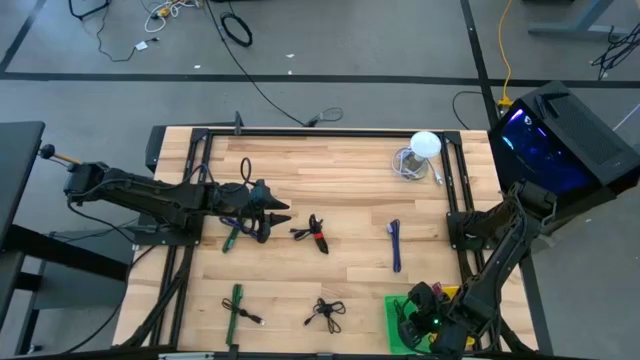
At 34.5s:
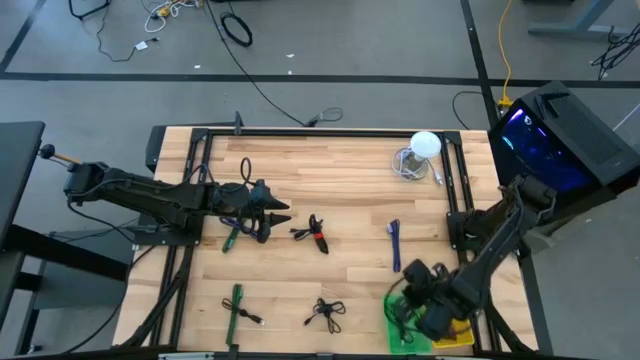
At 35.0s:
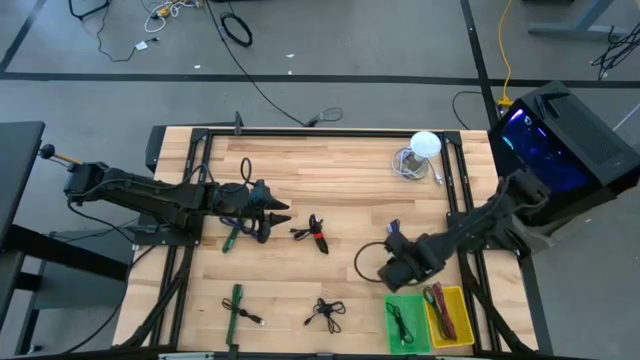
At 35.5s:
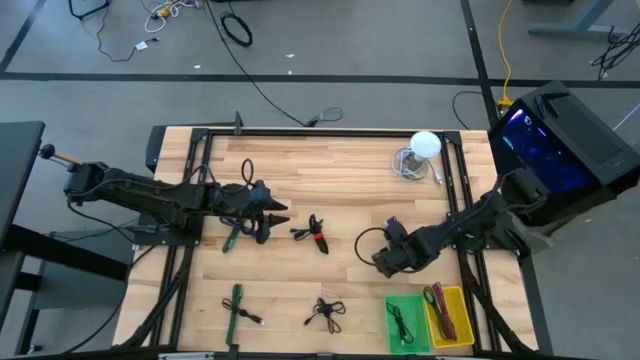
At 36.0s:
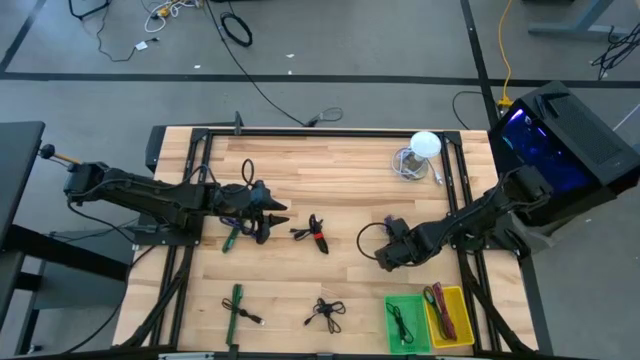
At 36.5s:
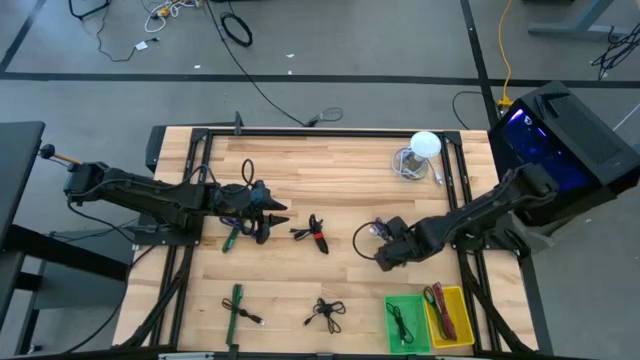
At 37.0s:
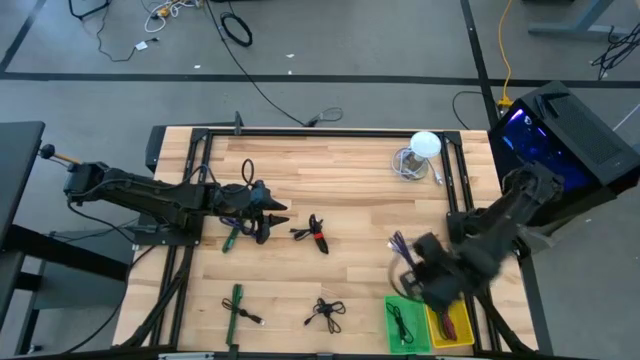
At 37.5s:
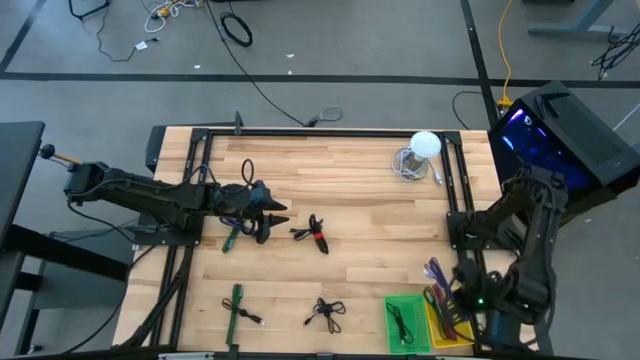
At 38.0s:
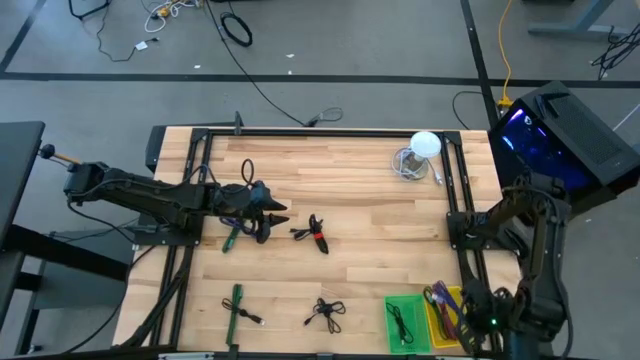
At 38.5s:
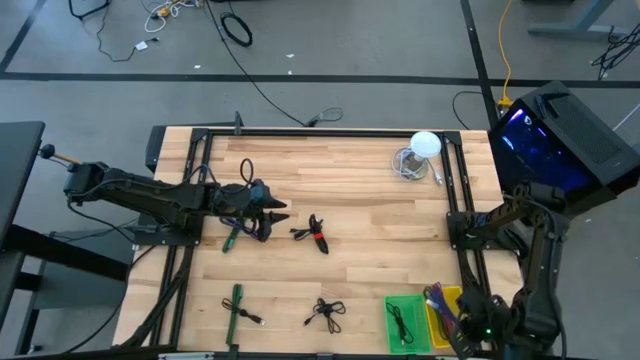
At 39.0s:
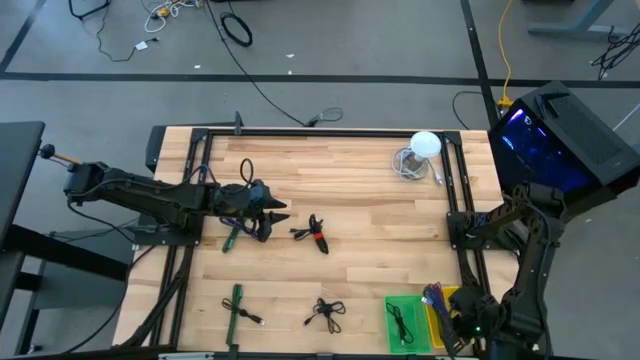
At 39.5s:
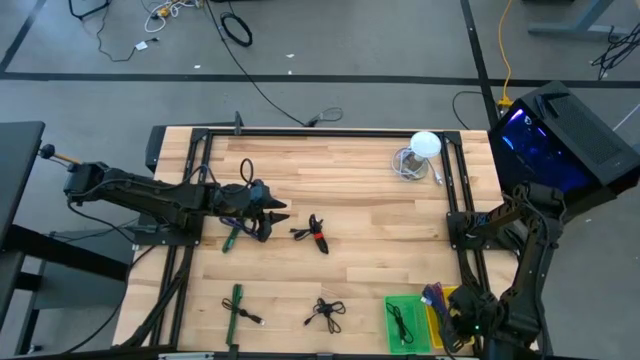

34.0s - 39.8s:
Task: Pick & Place USB Port
Put the right blue and black charger cable into the yellow basket

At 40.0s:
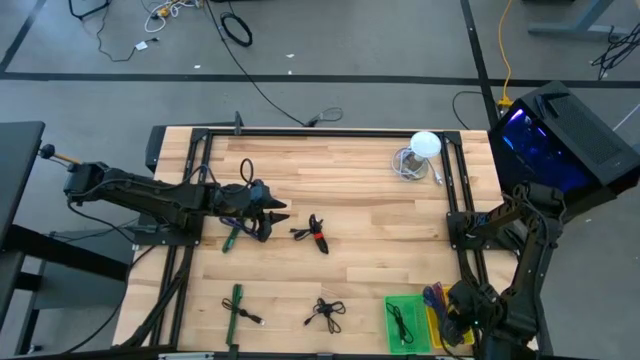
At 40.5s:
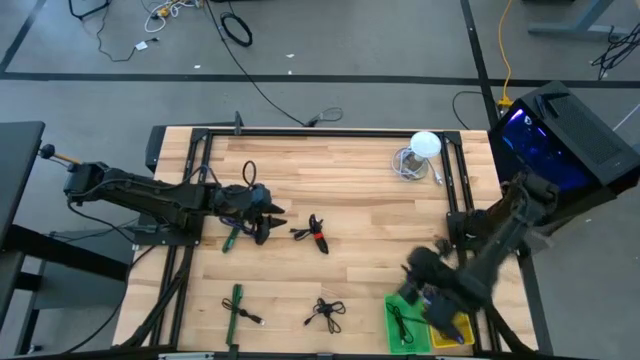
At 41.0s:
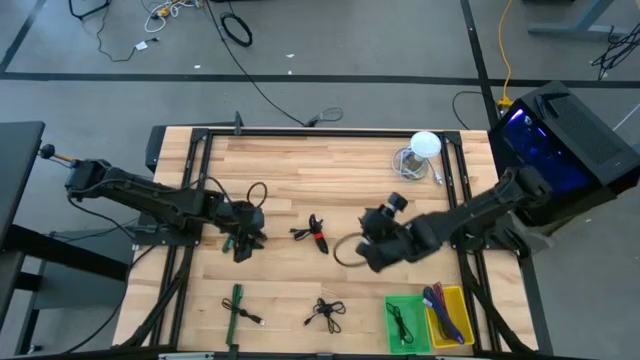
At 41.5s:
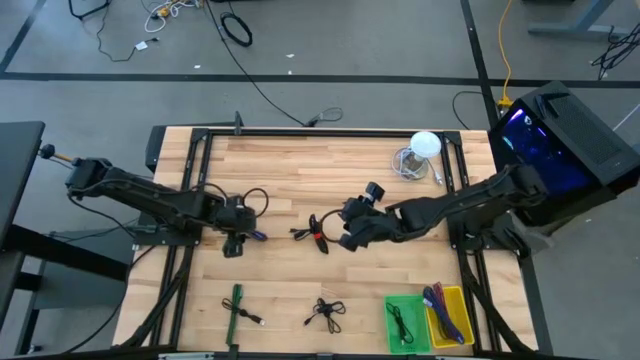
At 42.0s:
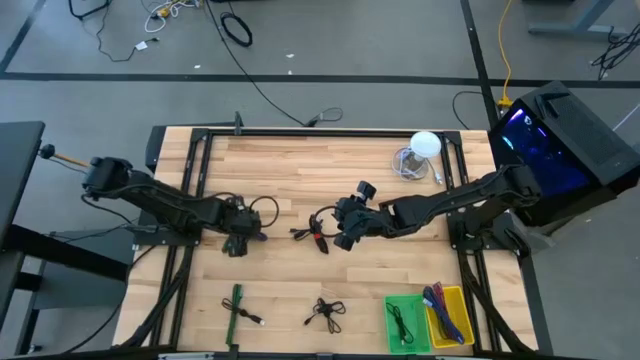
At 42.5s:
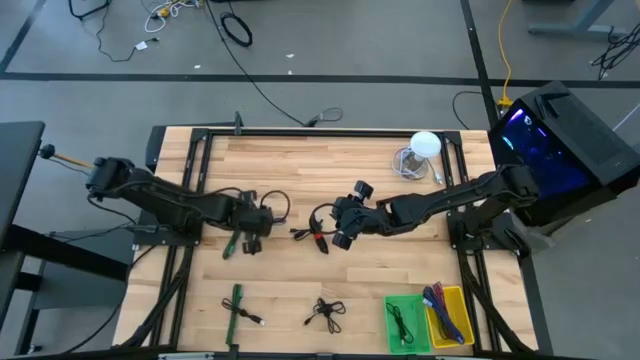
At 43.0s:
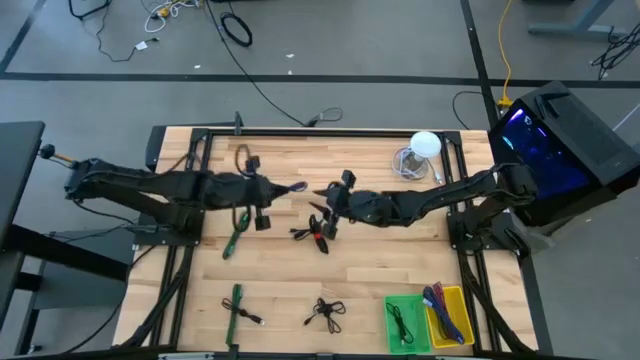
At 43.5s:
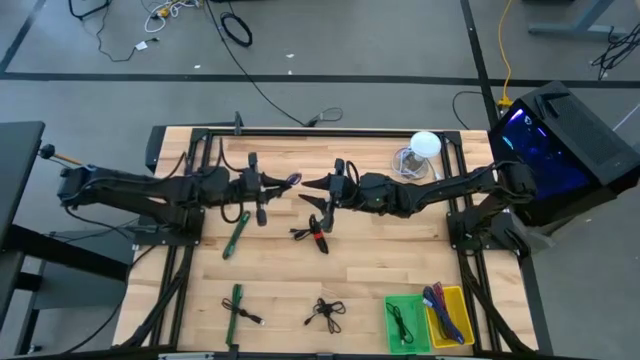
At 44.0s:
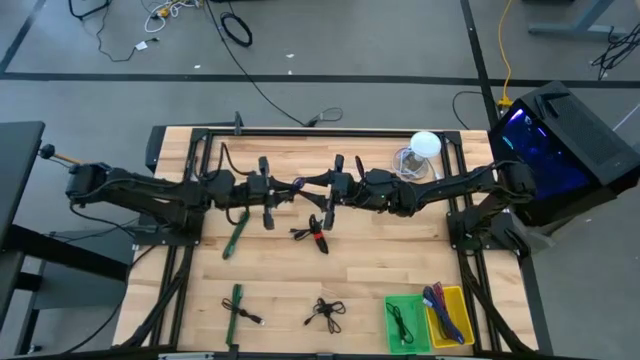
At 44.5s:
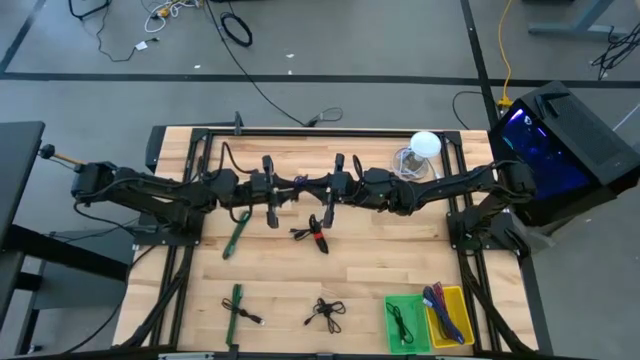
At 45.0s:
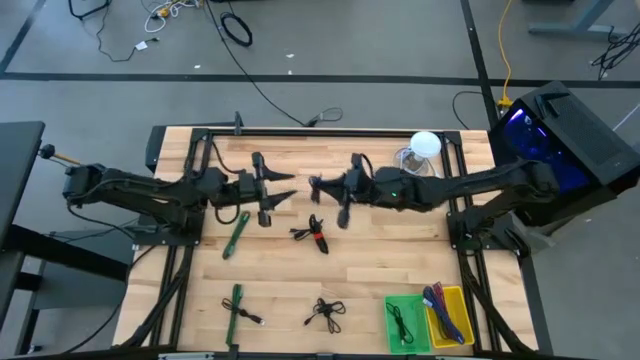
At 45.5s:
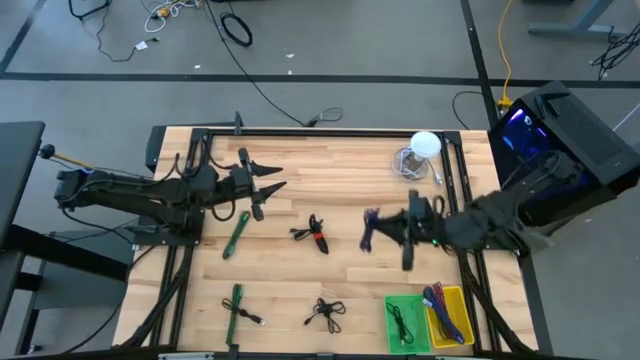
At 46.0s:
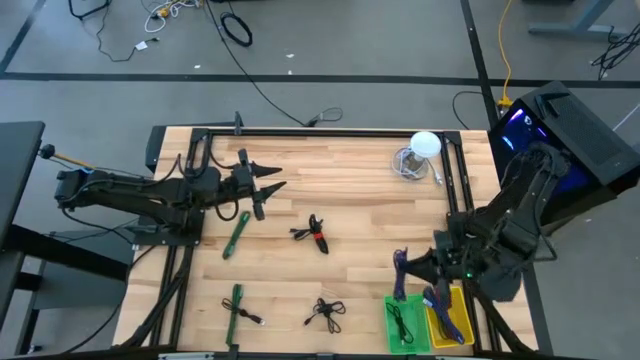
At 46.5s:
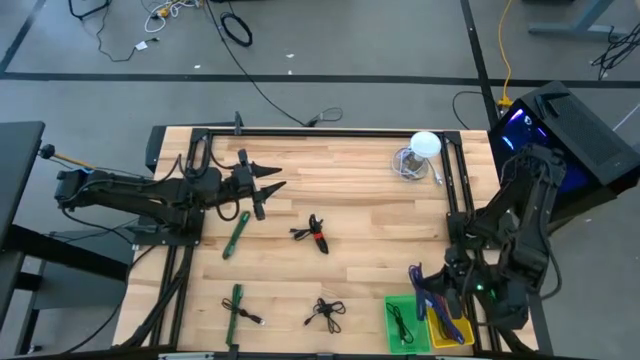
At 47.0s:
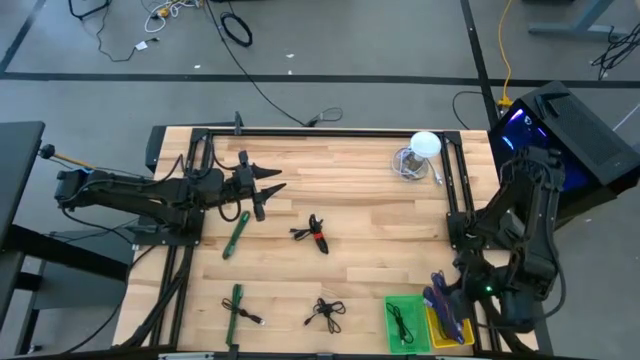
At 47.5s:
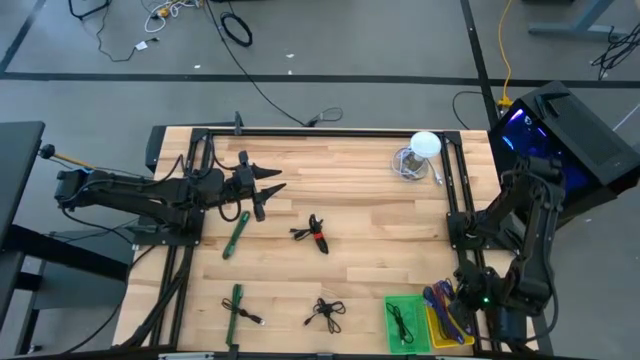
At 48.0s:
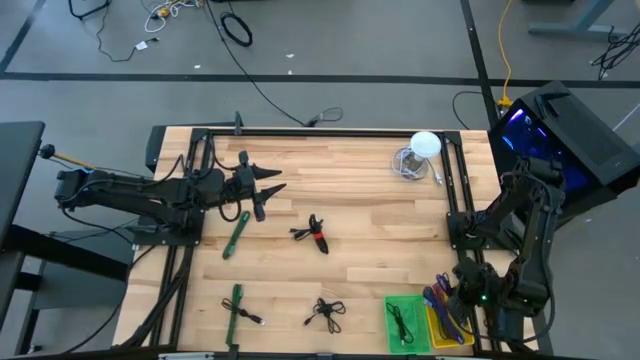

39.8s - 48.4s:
Put the blue and black charger cable into the yellow basket

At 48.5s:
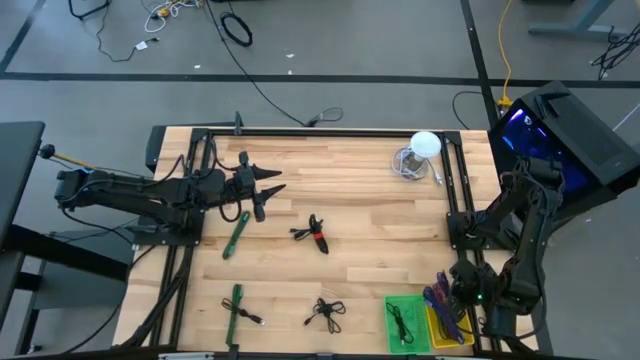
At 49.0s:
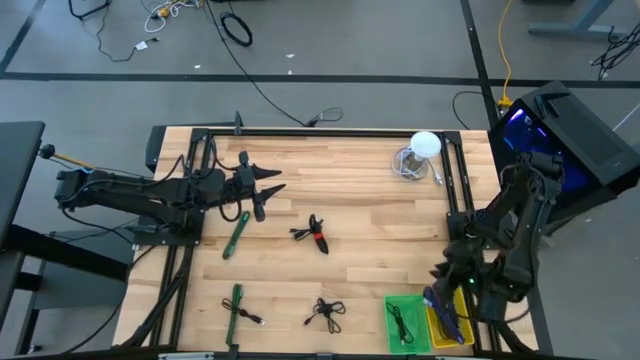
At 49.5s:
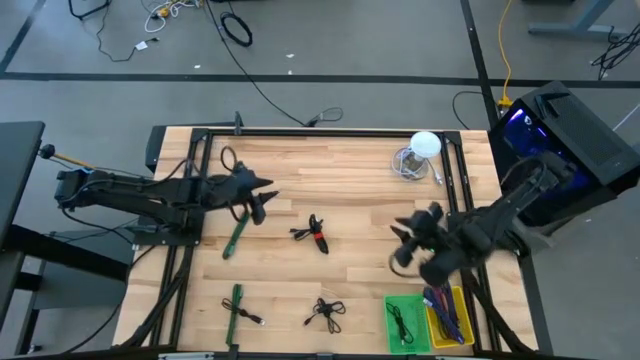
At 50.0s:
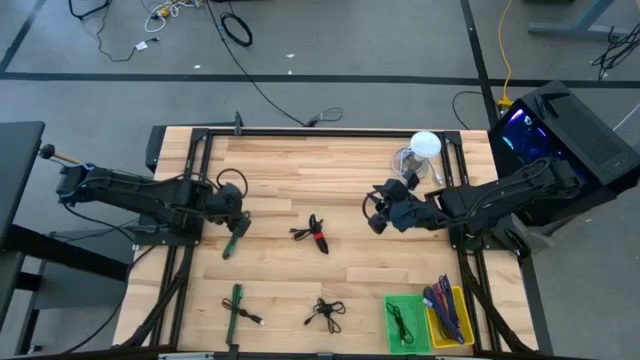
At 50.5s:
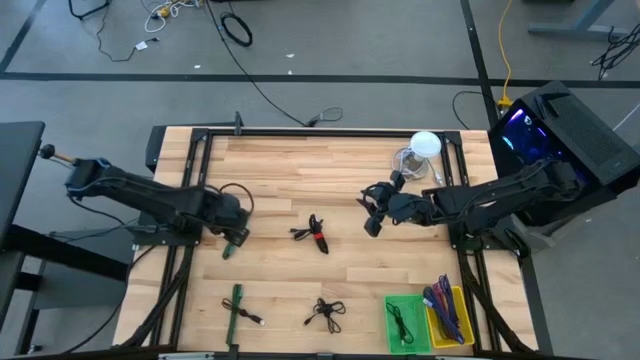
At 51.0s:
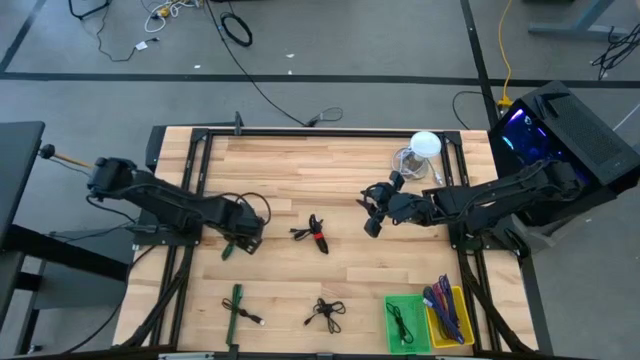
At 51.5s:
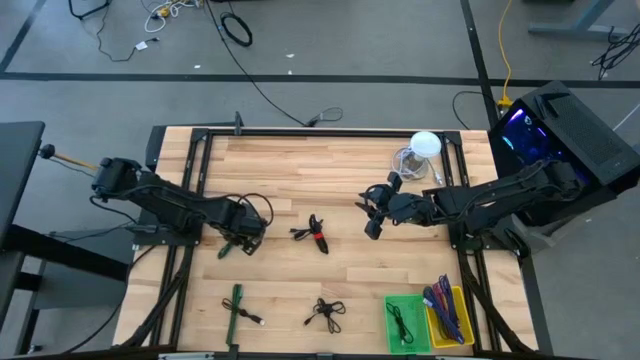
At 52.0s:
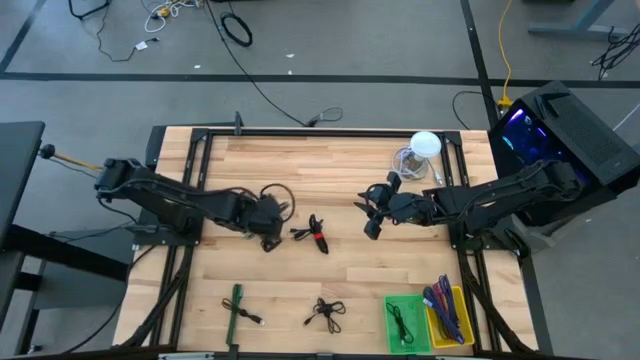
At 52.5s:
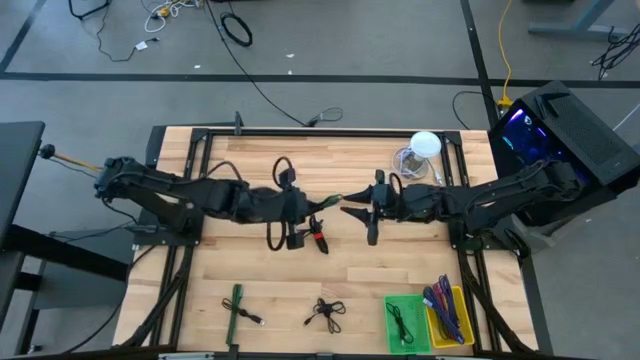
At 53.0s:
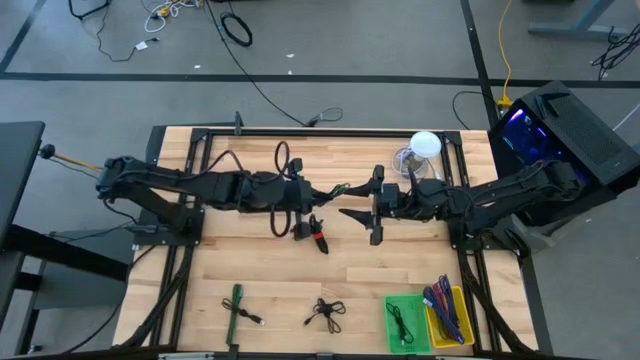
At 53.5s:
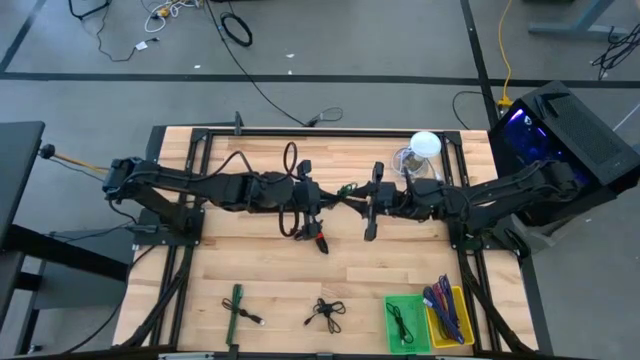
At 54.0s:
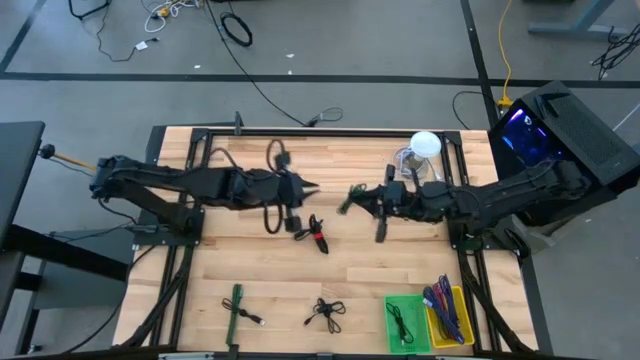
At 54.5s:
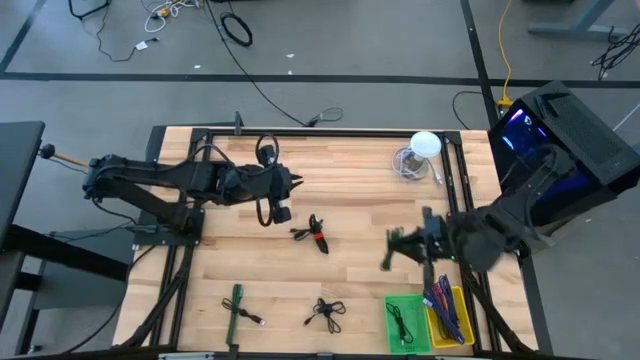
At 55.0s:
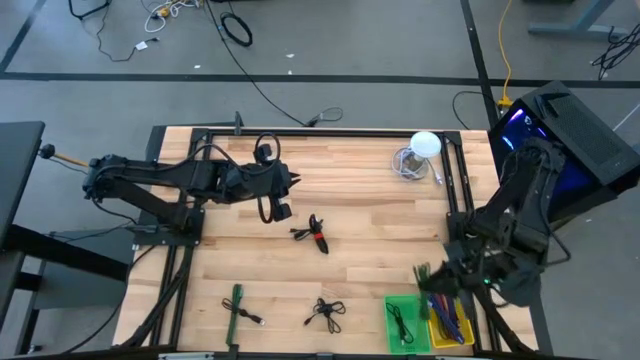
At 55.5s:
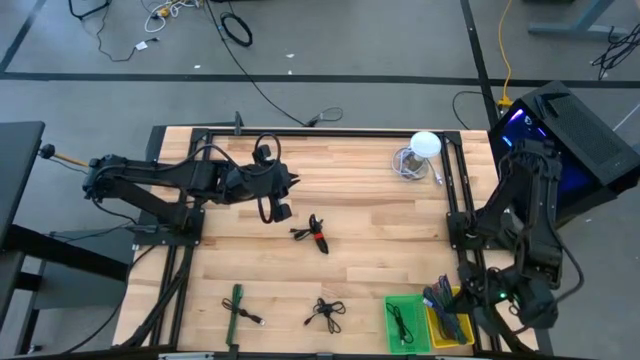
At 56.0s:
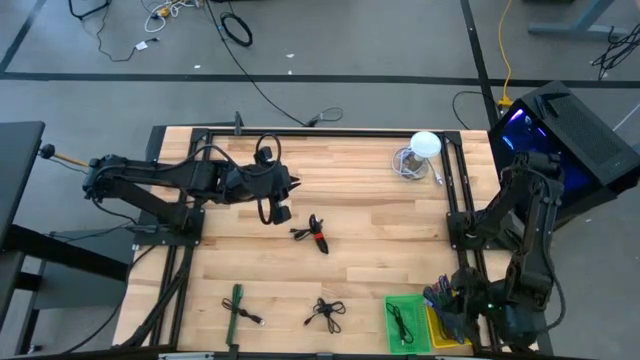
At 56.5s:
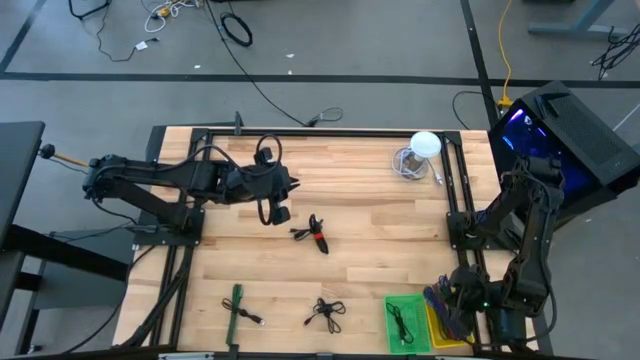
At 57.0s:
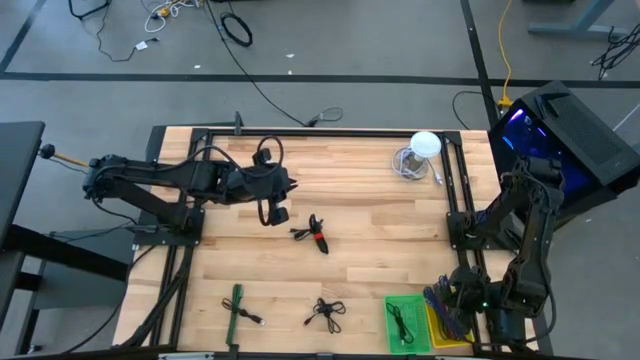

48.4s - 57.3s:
Put the top green and black charger cable into the yellow basket
